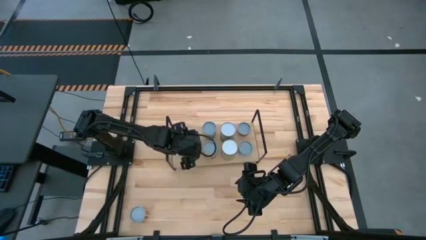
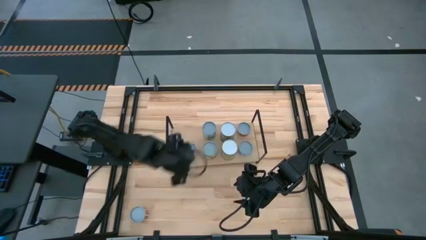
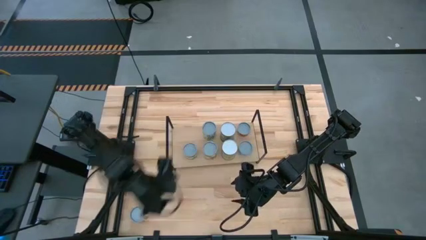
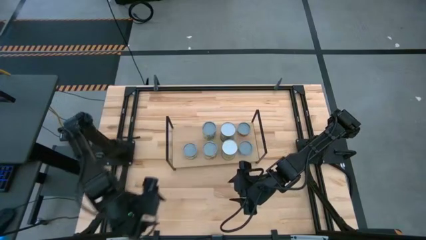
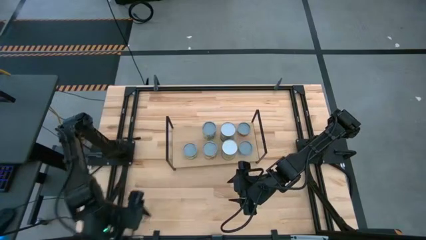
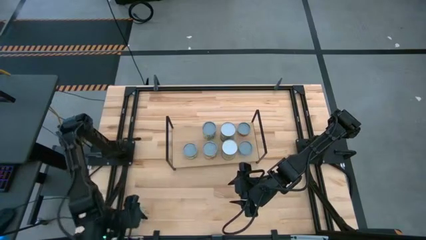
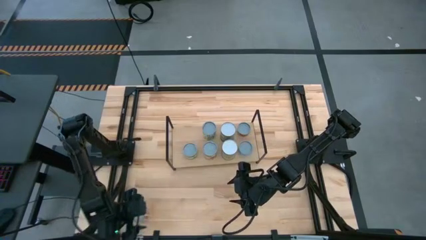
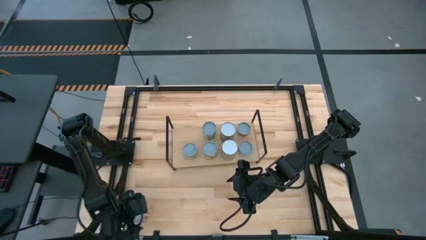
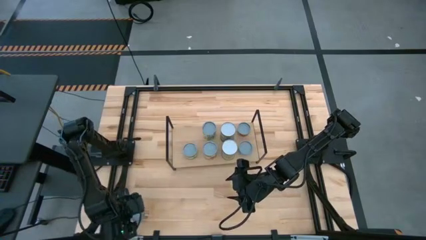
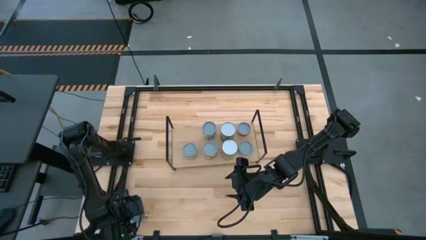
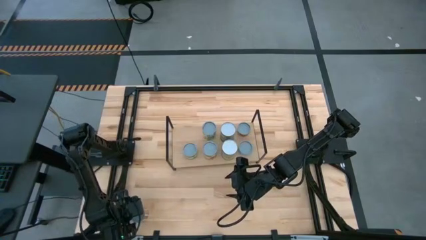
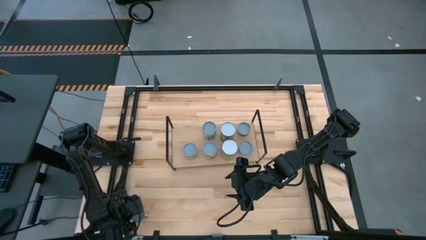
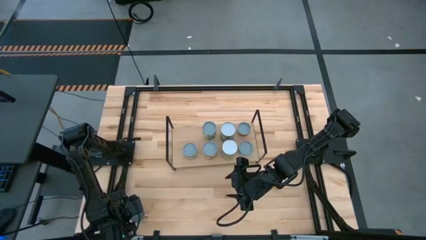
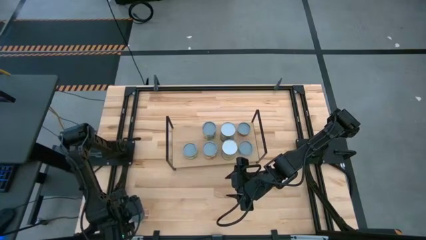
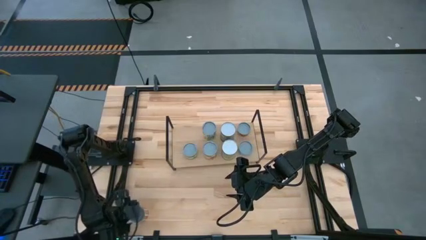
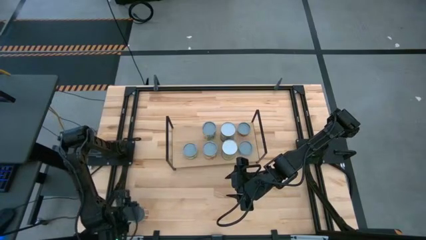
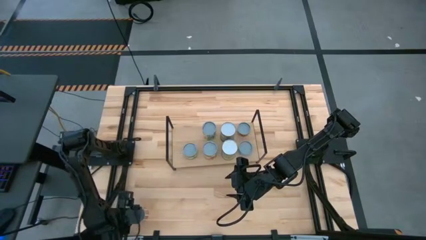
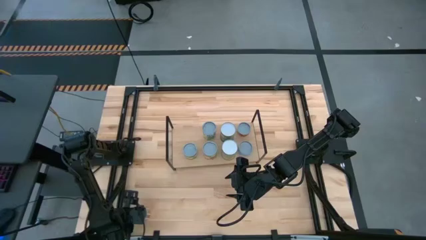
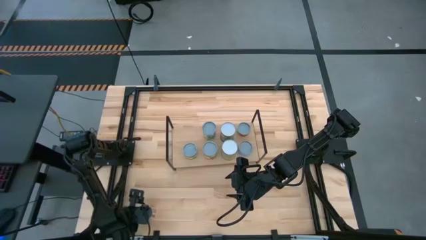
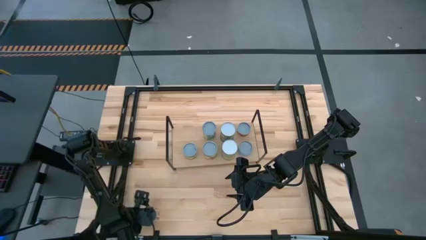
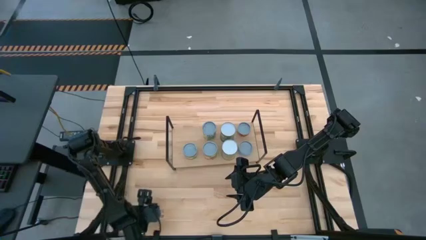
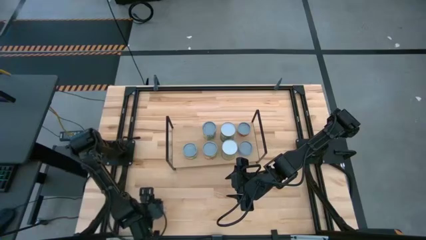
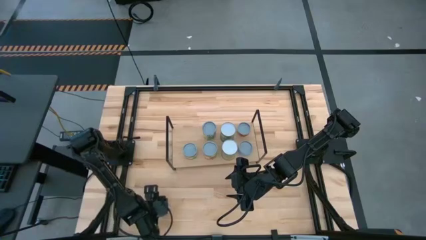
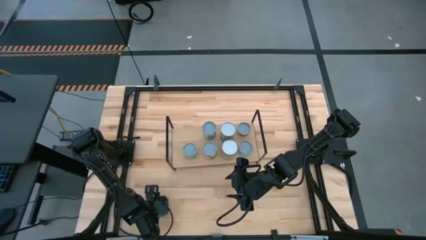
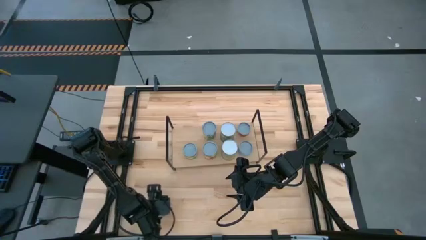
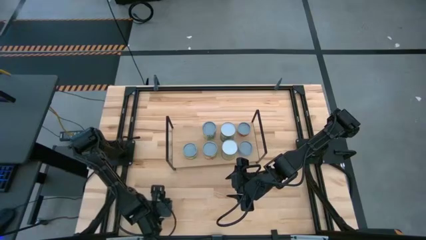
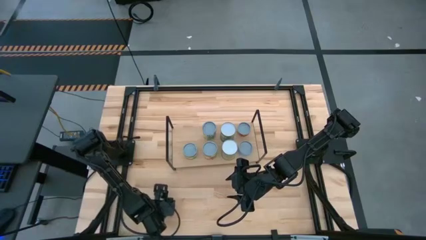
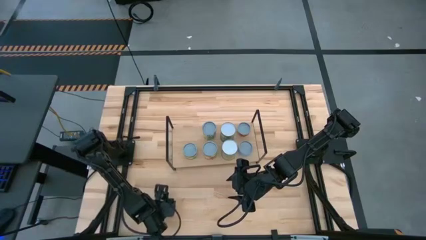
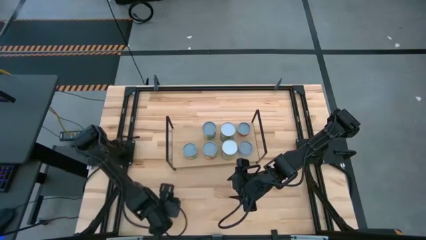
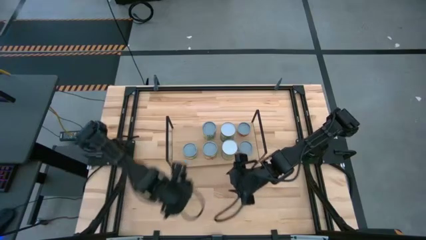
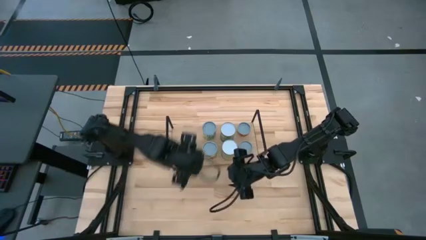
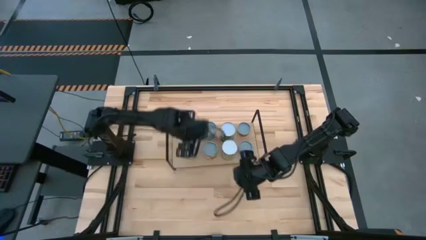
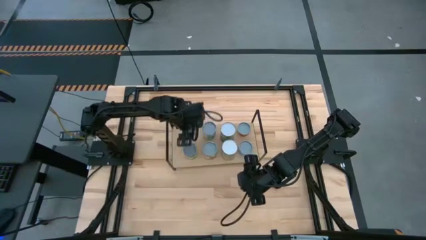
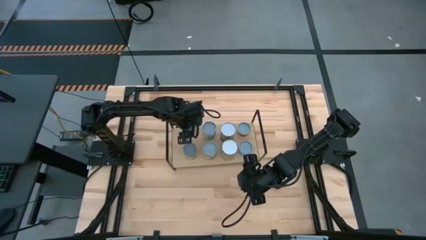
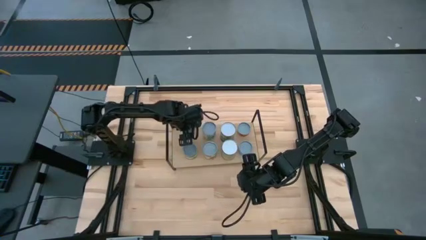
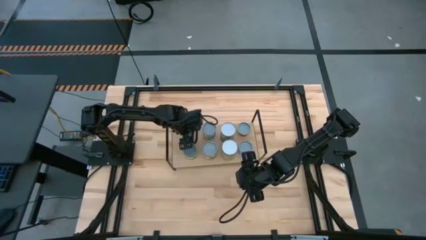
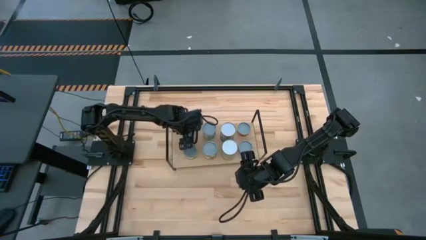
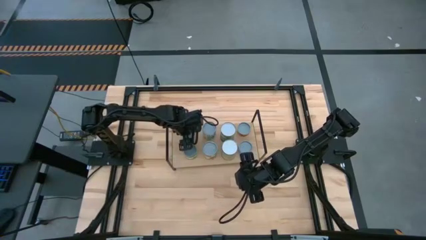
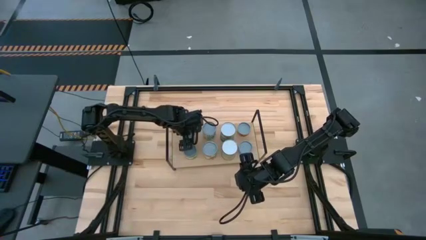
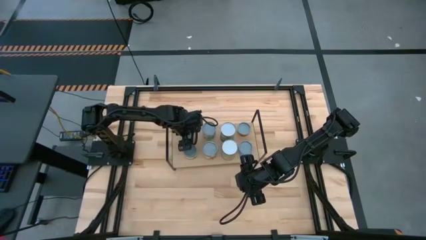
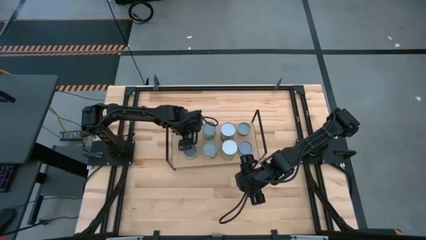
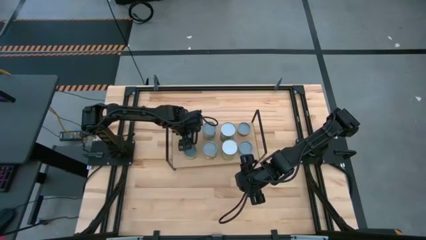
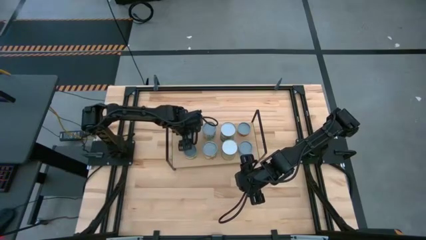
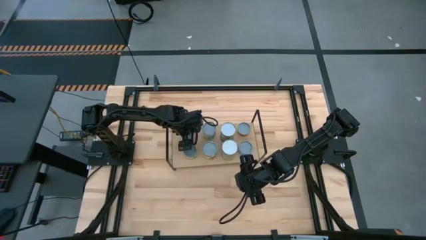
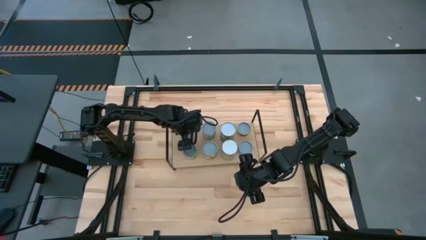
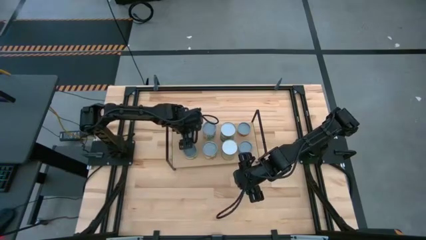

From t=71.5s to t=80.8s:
Task: Pick and place cans onto a shelf
Put the canned tomatoes on the shelf

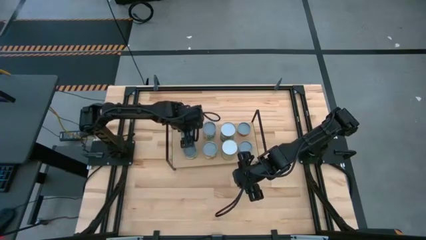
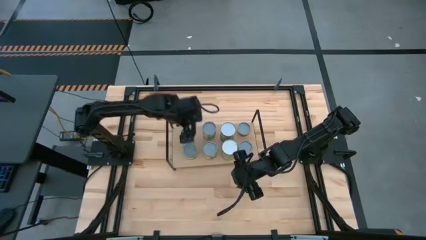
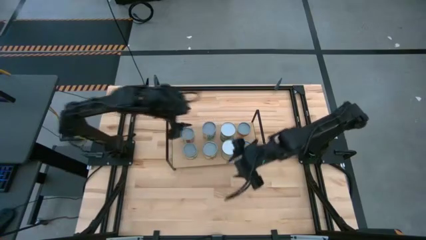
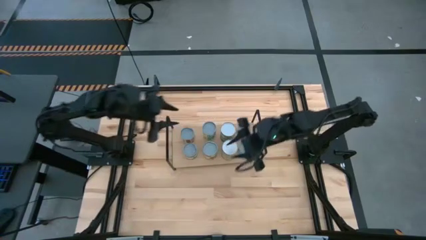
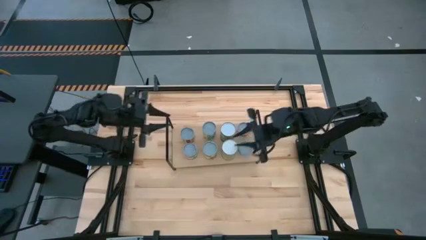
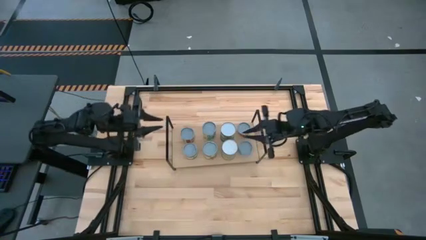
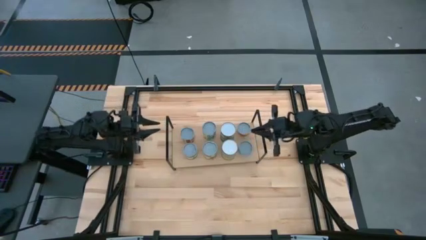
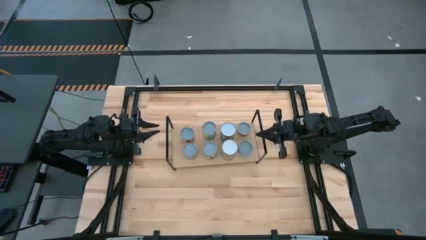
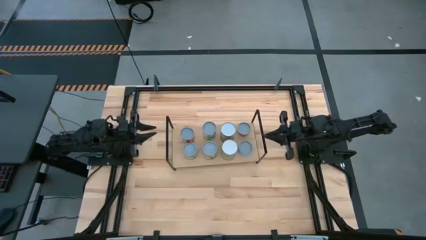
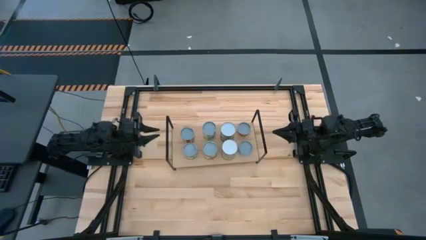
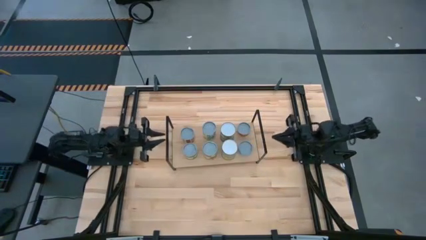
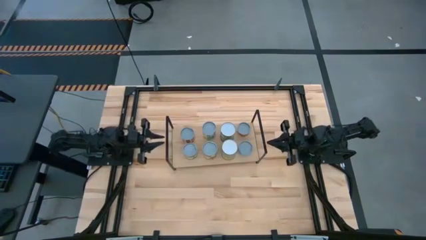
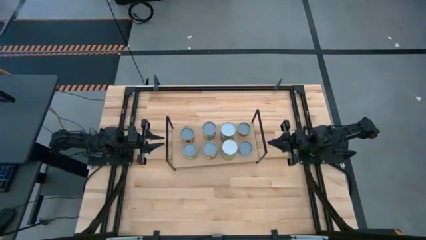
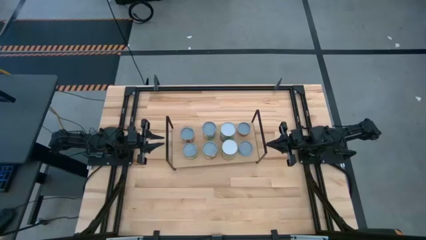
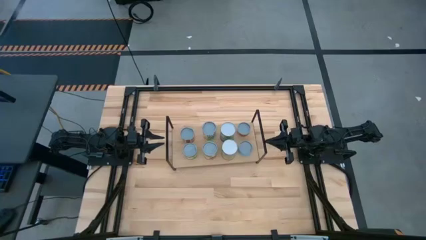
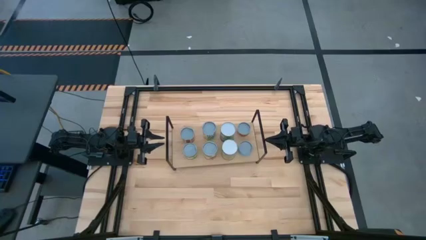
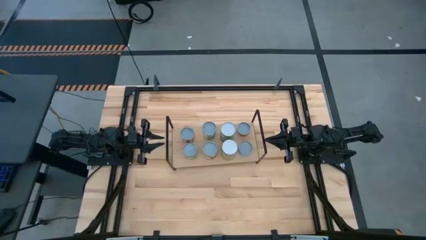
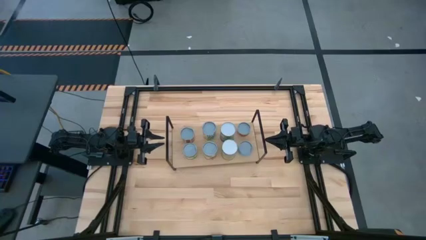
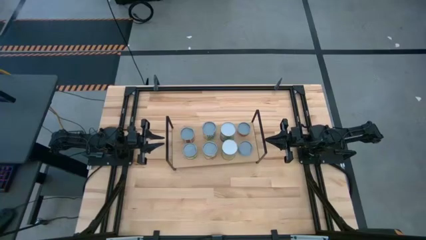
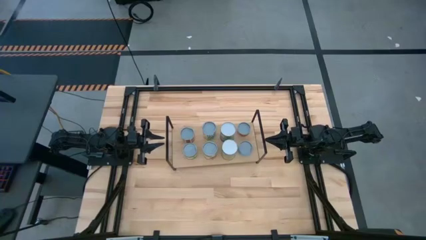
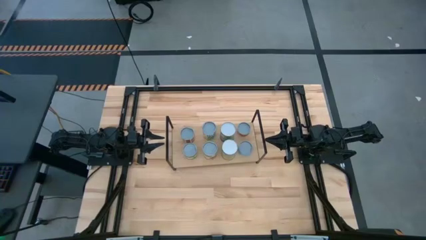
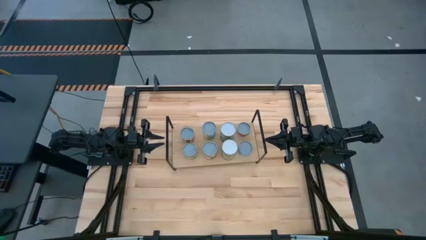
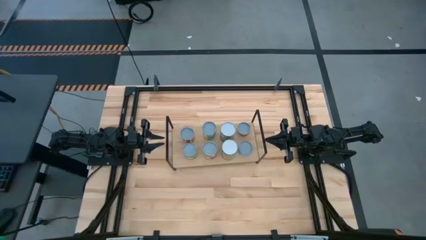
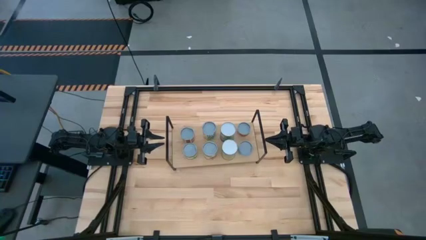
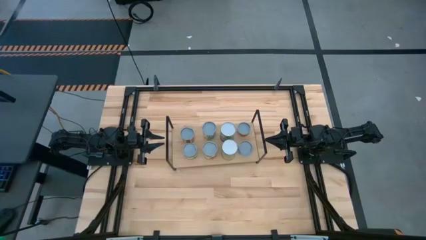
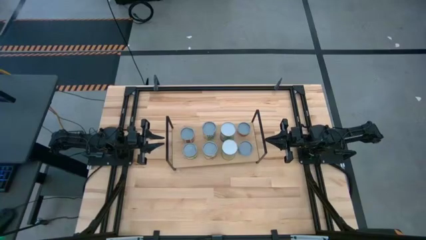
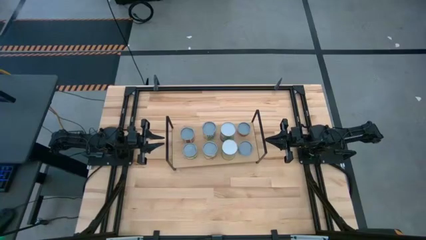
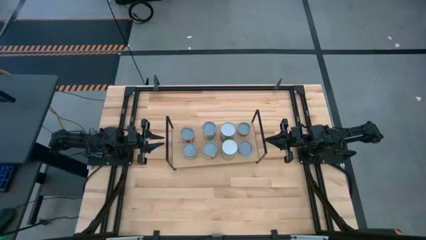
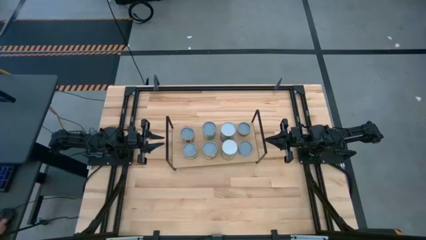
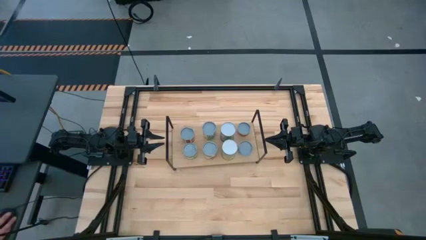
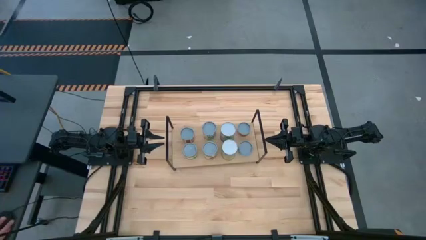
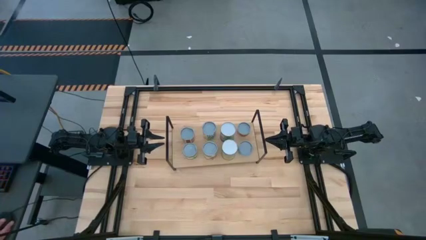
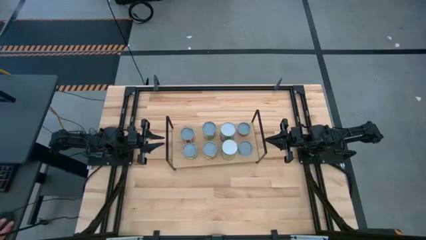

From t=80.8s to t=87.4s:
Return to Home Position
